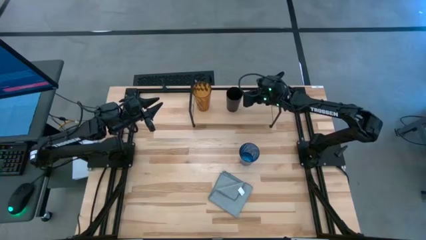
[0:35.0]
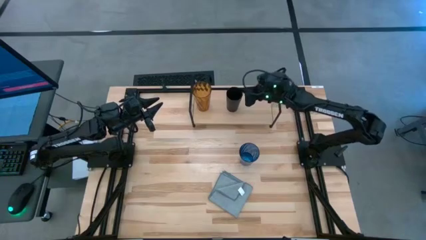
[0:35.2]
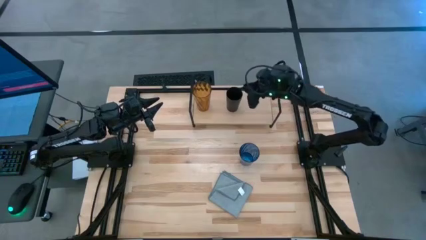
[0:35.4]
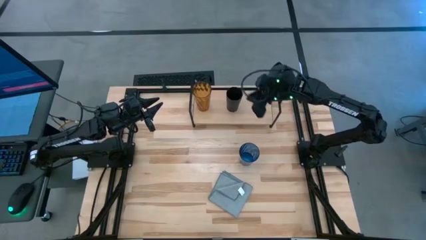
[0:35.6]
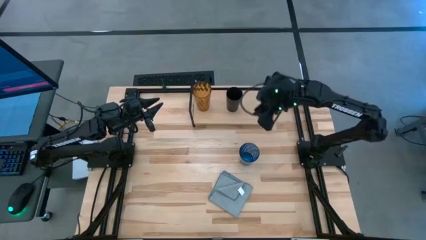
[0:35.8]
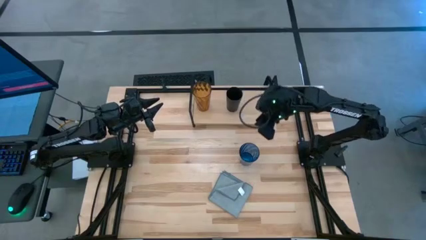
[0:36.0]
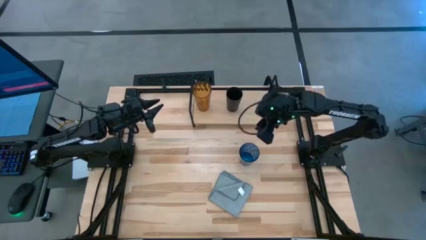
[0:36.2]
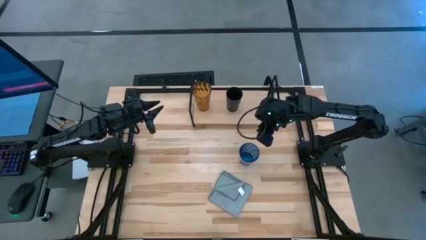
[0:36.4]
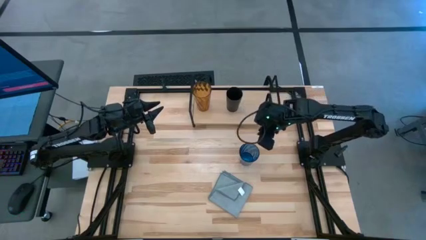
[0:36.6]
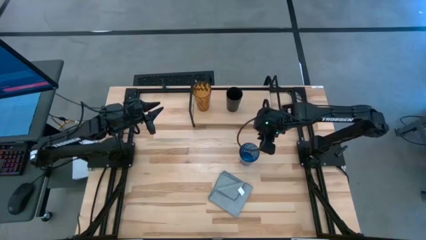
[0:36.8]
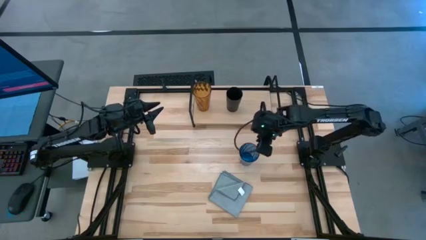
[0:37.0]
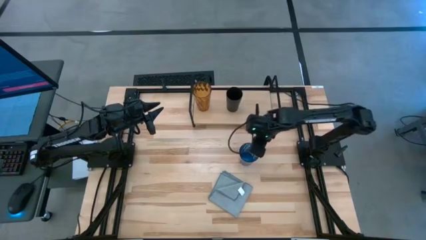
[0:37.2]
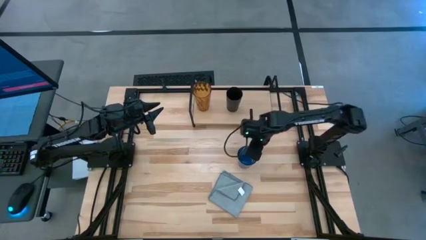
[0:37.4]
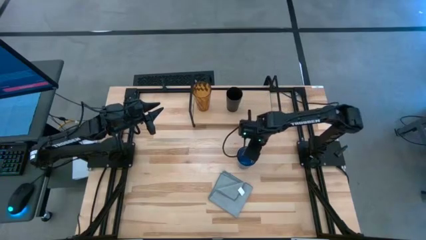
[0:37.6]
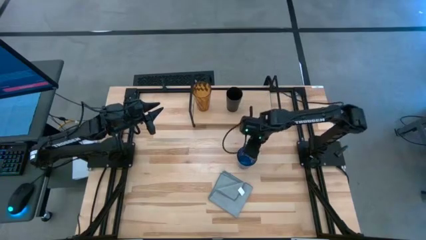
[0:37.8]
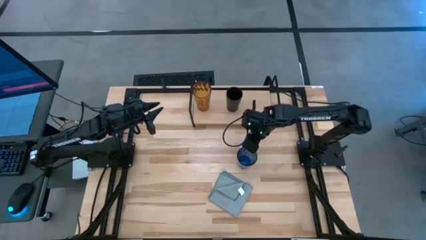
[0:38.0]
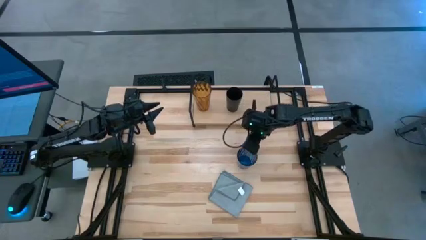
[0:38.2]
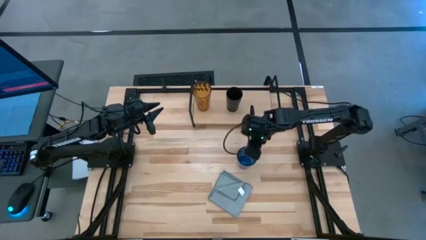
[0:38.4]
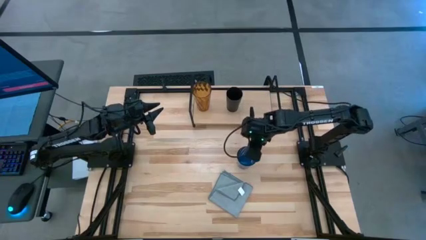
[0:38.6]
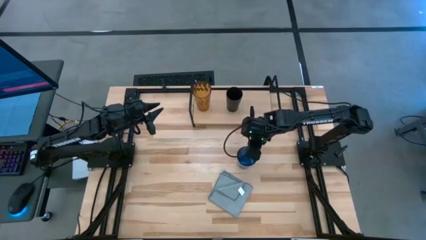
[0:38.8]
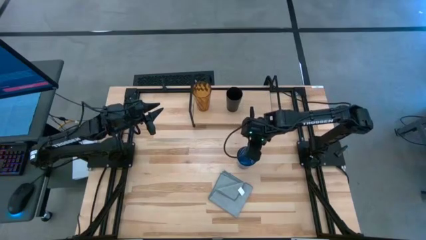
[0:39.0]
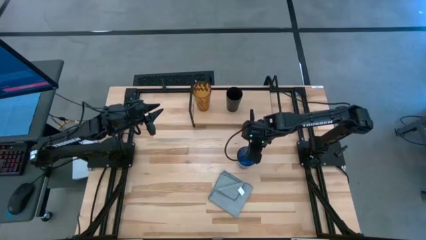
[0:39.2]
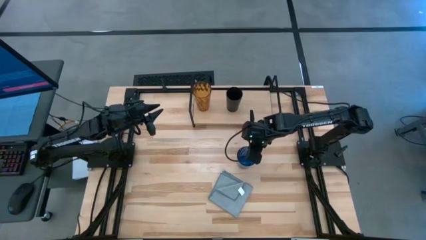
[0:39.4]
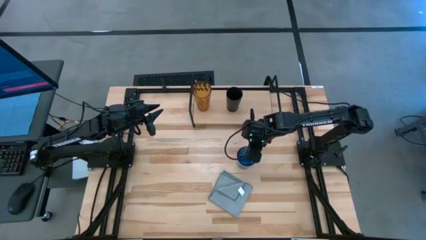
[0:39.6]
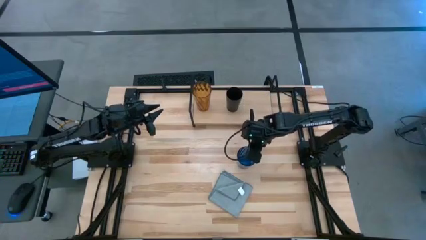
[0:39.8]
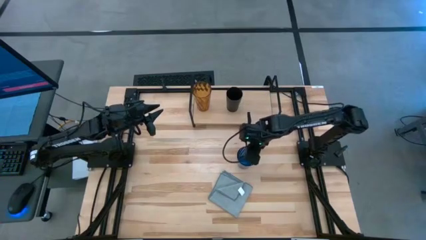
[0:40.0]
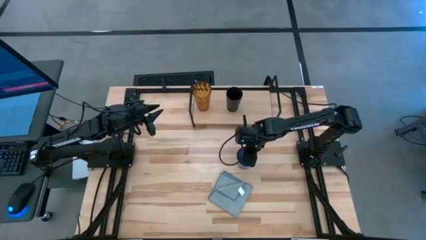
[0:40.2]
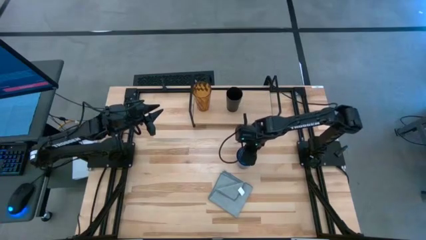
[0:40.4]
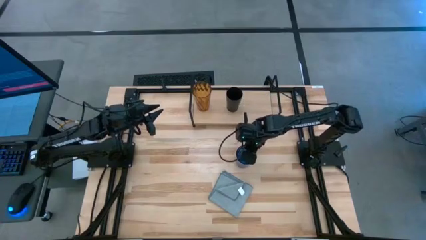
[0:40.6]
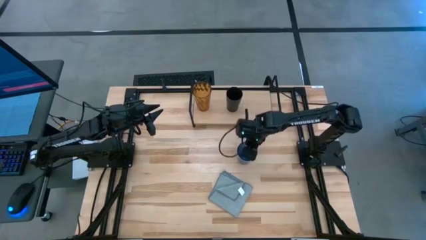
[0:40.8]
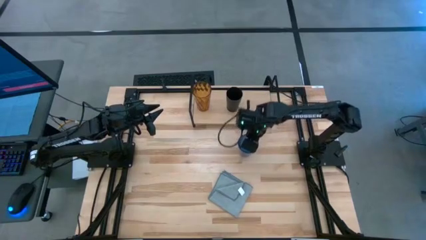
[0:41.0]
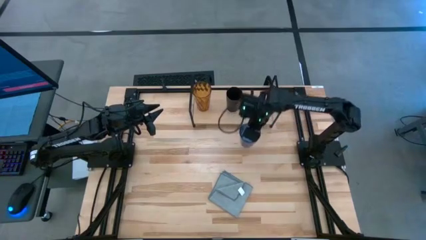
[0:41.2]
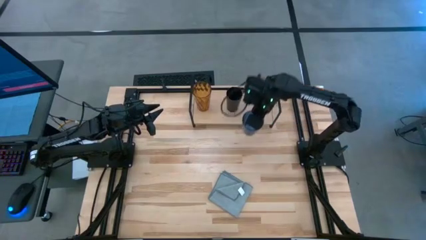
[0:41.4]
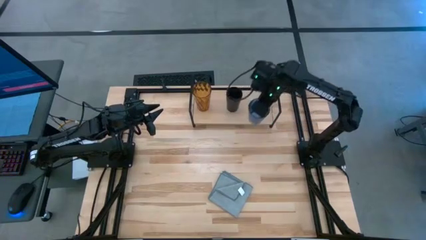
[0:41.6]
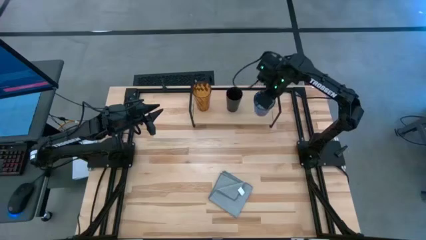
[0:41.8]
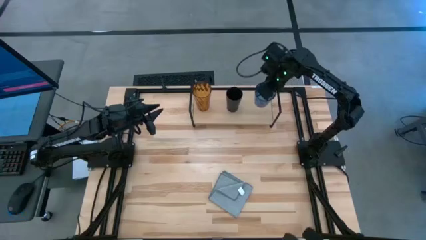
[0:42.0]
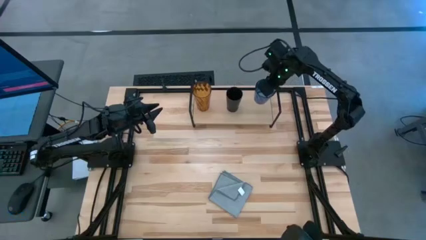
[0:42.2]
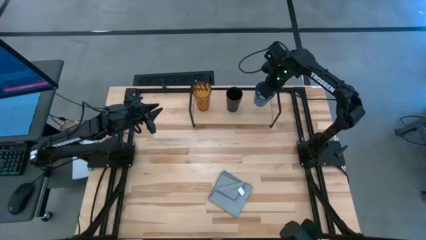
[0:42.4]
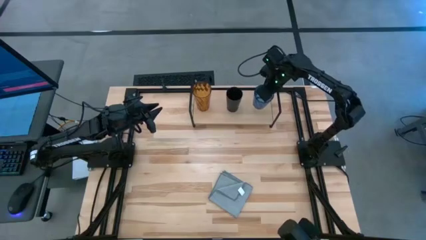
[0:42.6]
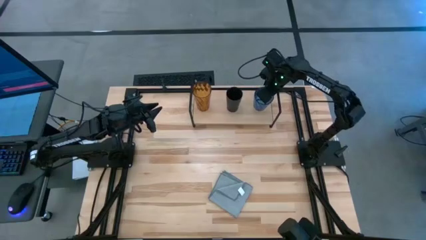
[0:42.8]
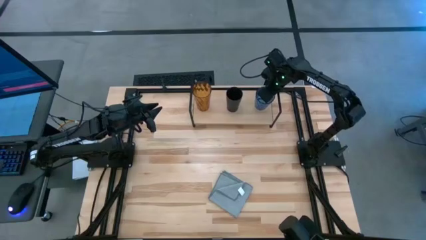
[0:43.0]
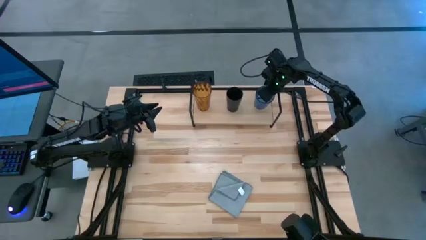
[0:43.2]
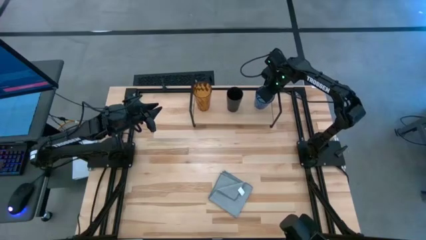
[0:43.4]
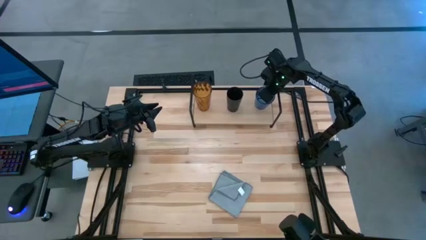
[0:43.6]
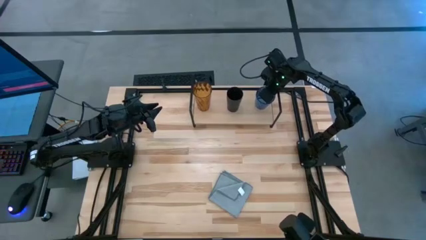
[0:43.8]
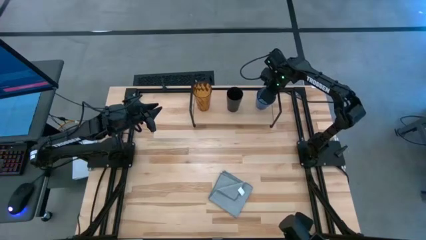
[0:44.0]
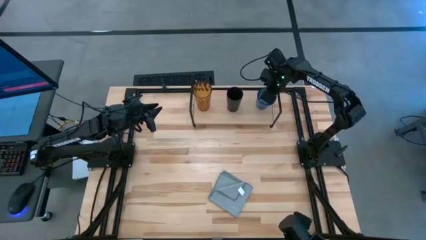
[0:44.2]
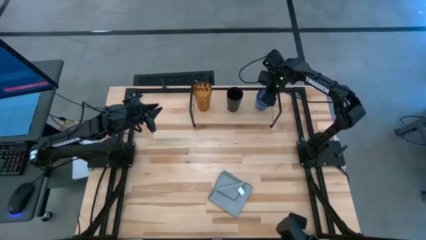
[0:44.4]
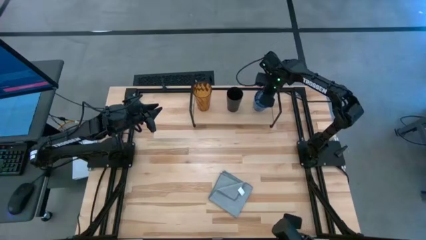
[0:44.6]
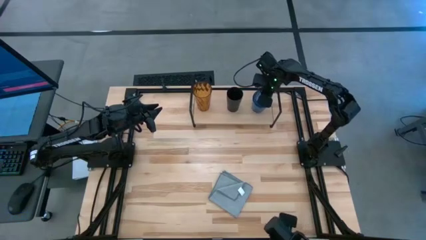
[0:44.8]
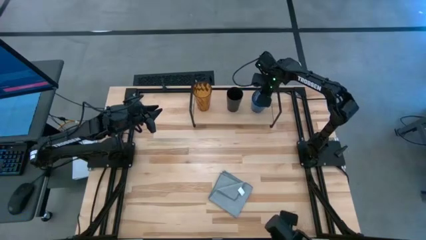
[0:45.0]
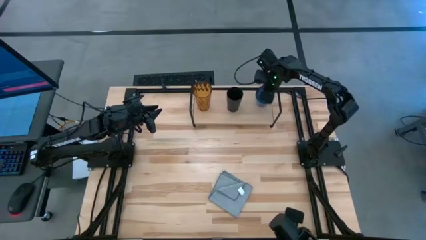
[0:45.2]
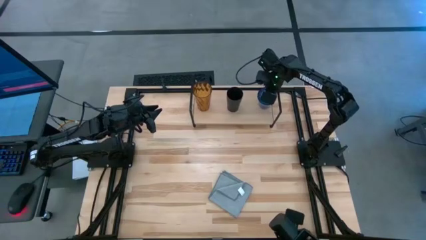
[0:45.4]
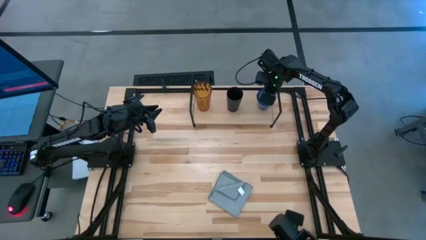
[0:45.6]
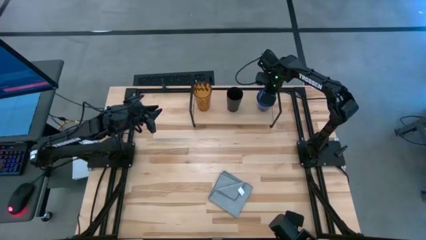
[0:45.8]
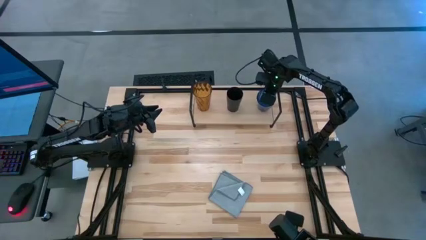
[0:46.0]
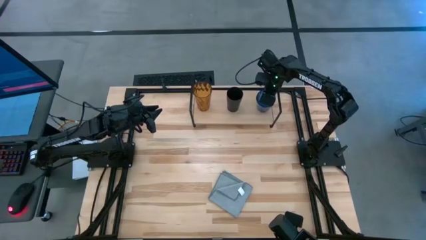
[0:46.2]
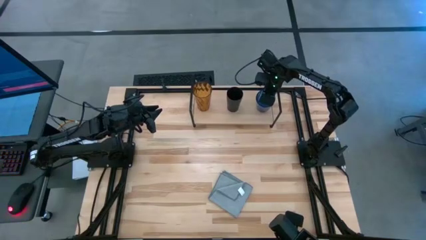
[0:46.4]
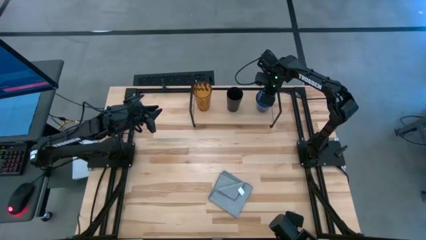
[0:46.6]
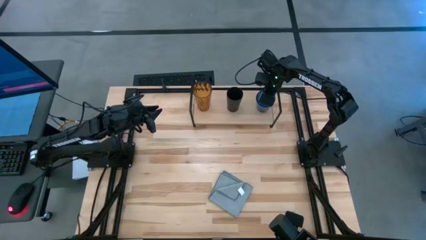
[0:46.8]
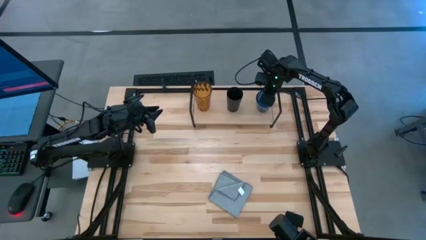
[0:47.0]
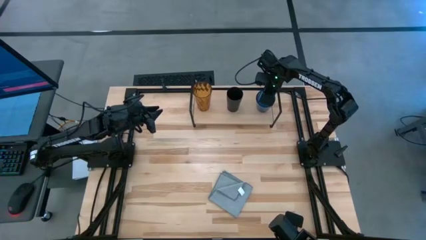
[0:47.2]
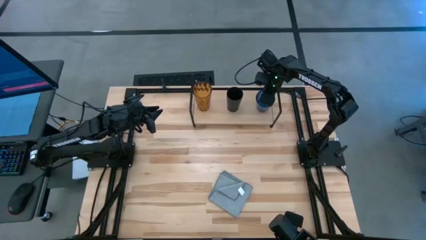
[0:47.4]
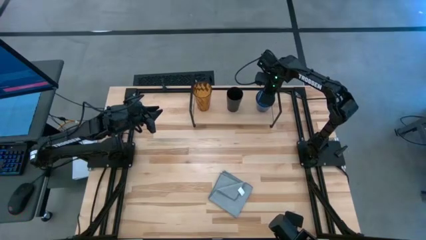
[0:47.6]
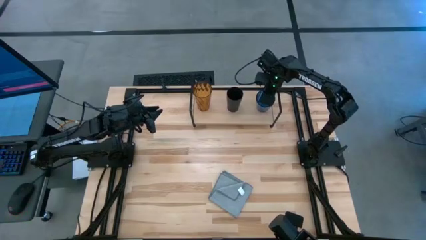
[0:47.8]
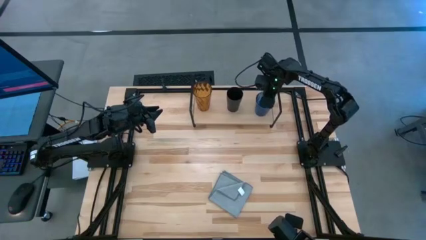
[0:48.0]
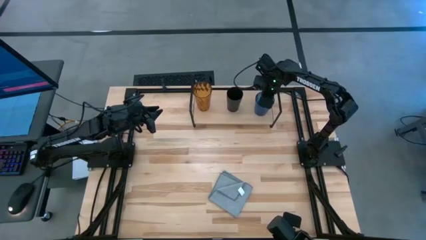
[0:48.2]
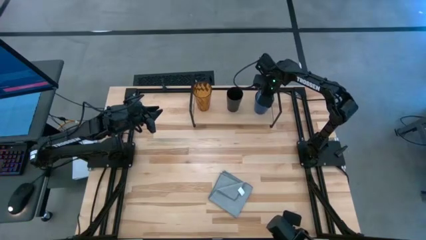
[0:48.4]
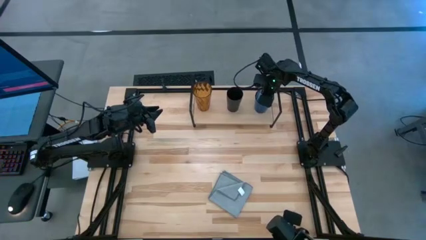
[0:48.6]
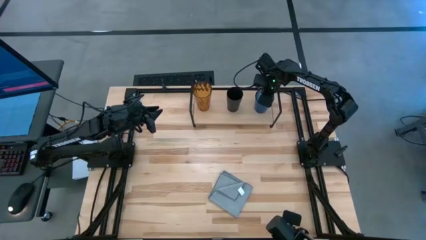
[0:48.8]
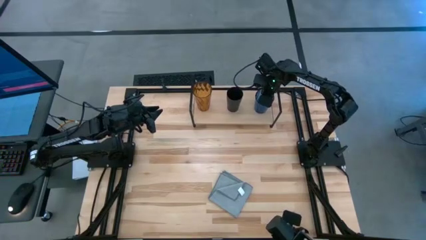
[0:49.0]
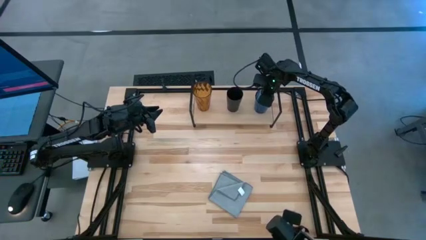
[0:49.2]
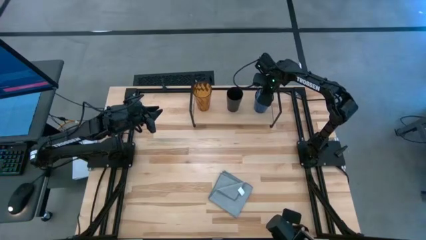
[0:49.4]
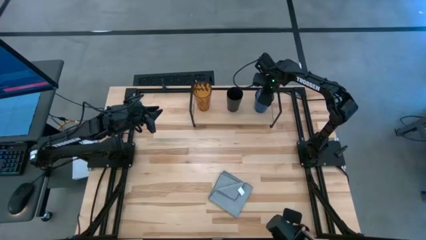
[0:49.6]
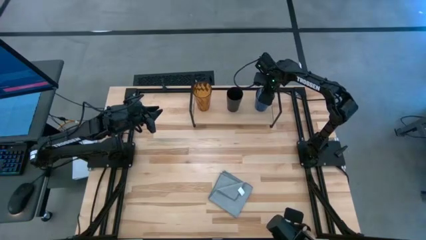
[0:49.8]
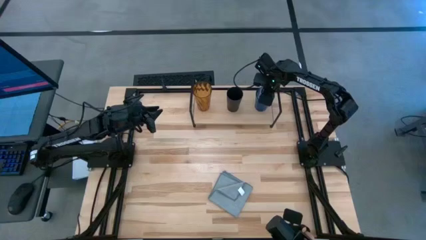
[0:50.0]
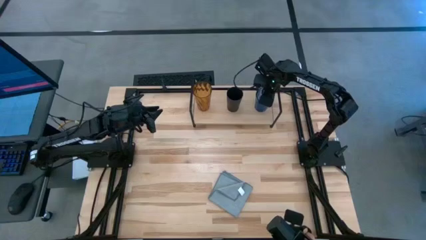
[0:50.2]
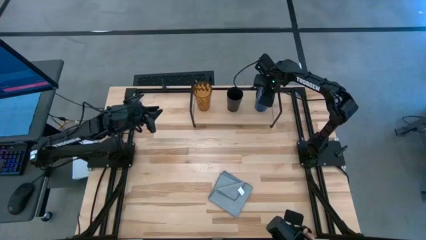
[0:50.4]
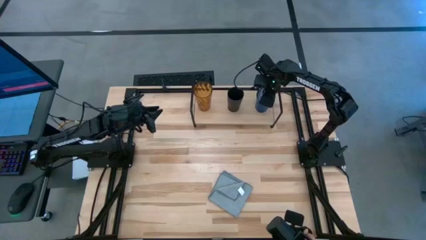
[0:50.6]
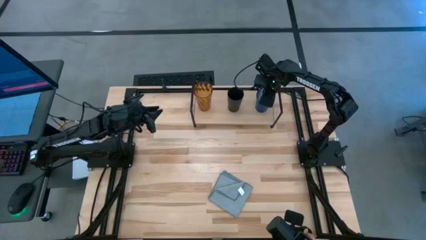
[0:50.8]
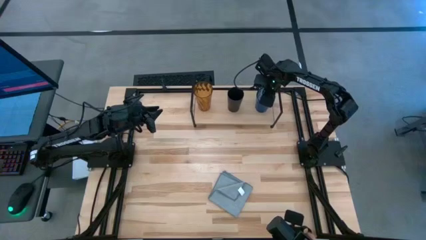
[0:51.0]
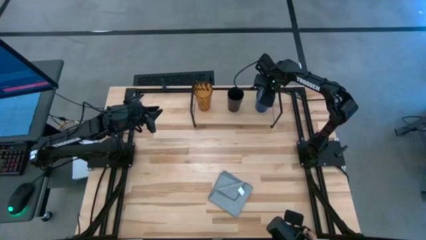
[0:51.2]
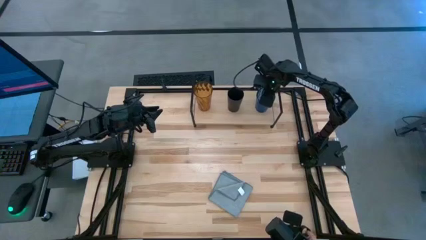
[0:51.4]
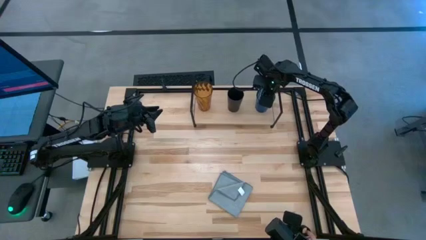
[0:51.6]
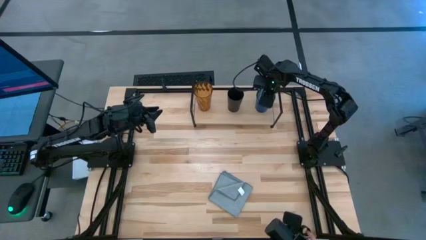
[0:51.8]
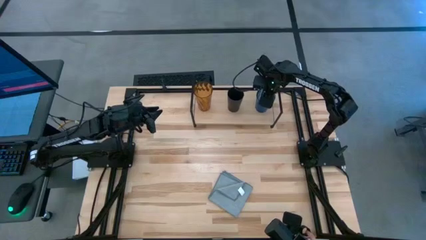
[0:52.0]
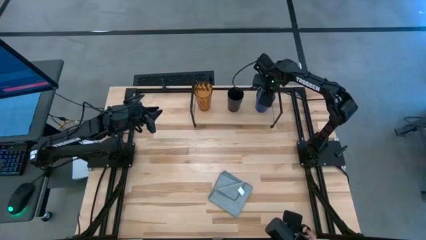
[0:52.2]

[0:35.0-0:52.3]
Task: Stack small to large cups/mugs on shelf
Put the blue cup on the shelf
